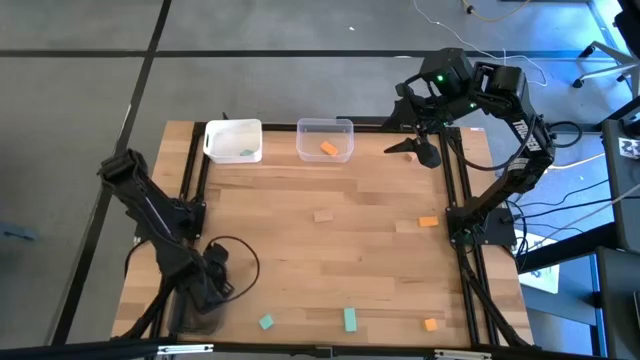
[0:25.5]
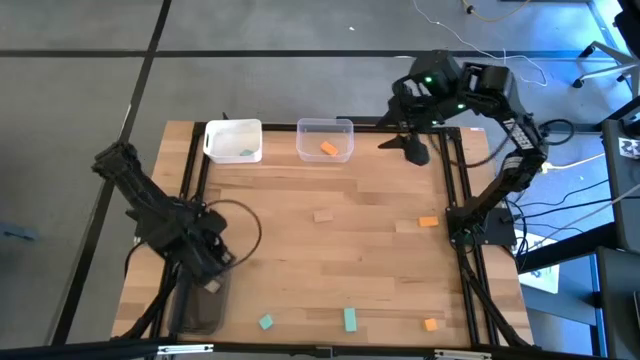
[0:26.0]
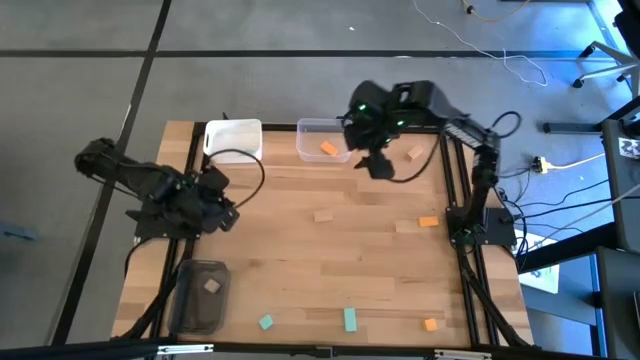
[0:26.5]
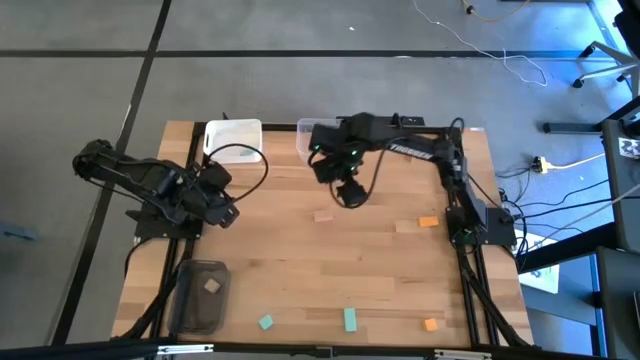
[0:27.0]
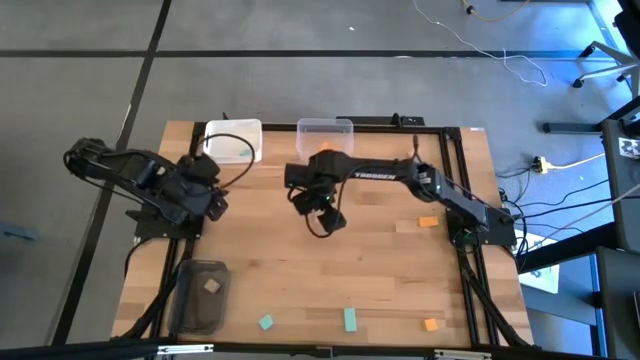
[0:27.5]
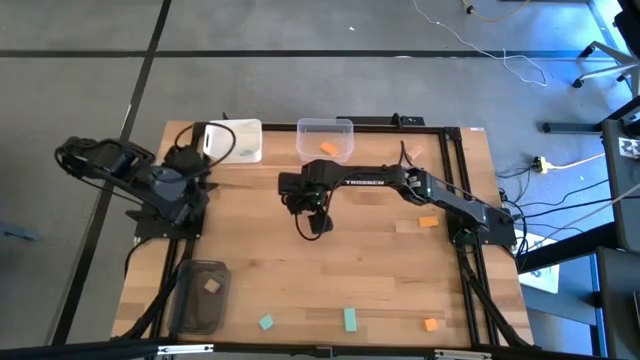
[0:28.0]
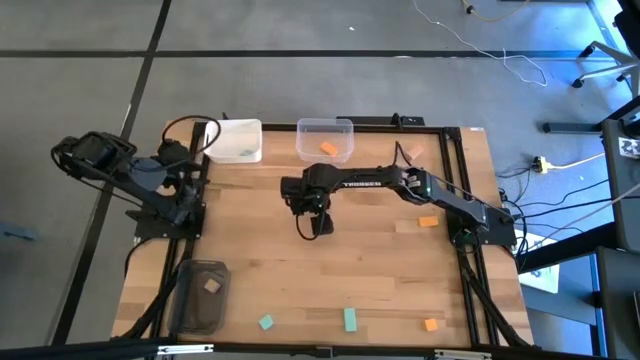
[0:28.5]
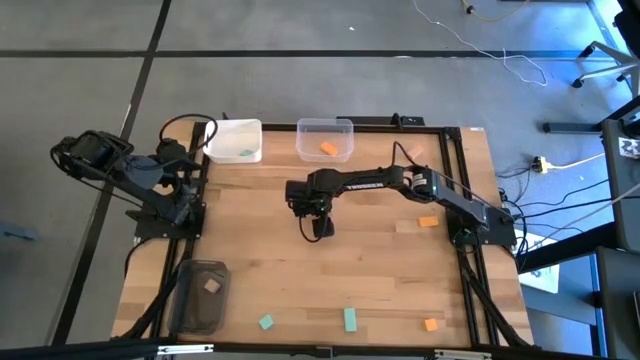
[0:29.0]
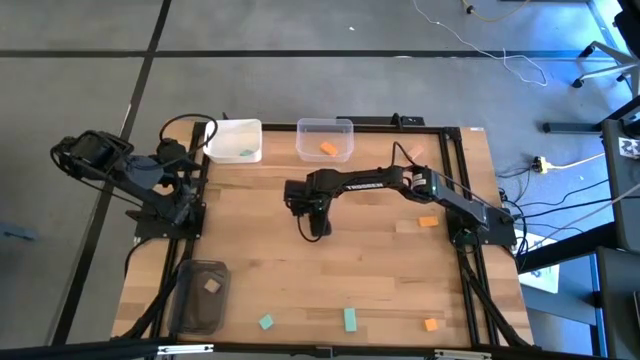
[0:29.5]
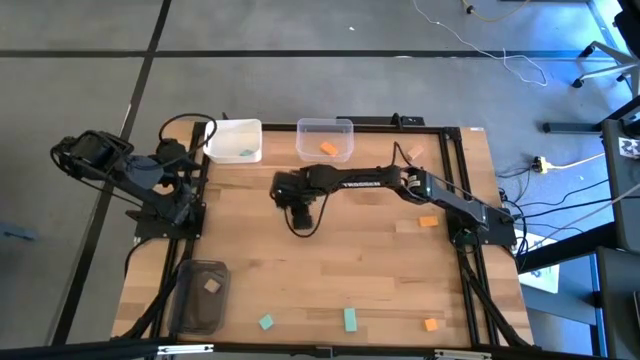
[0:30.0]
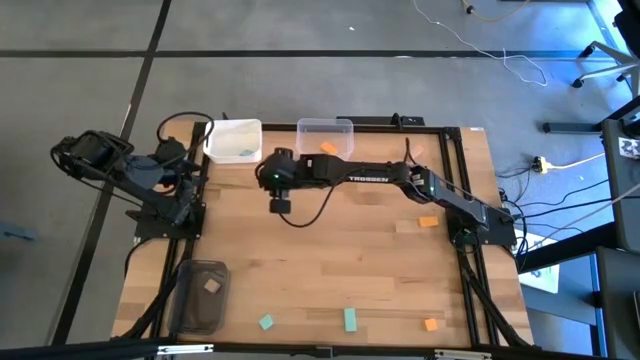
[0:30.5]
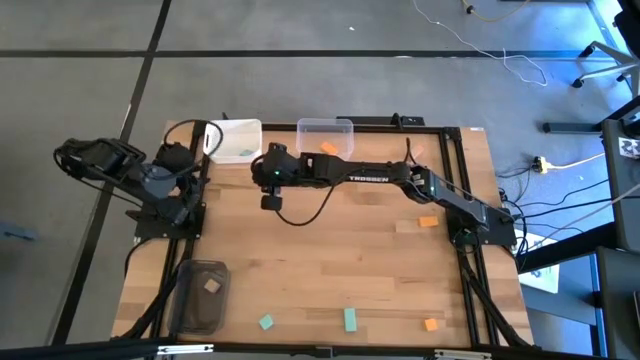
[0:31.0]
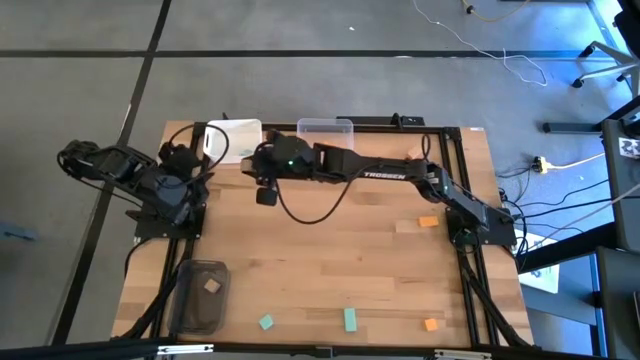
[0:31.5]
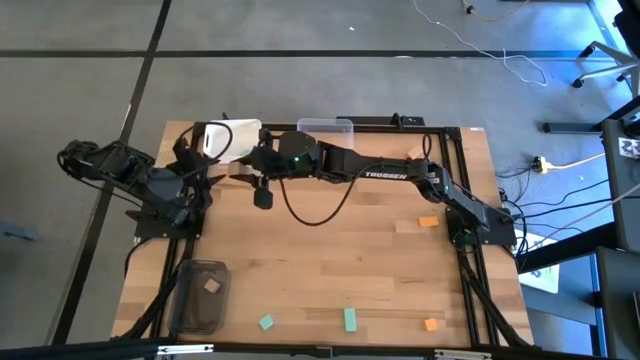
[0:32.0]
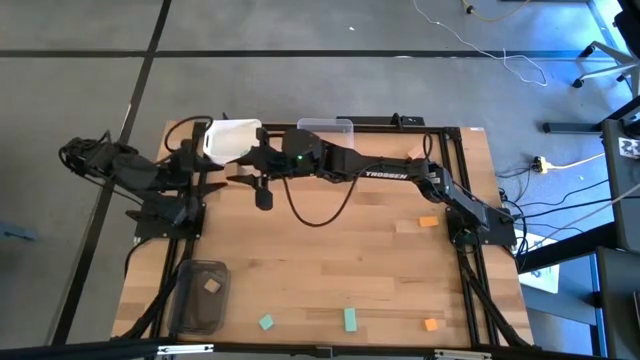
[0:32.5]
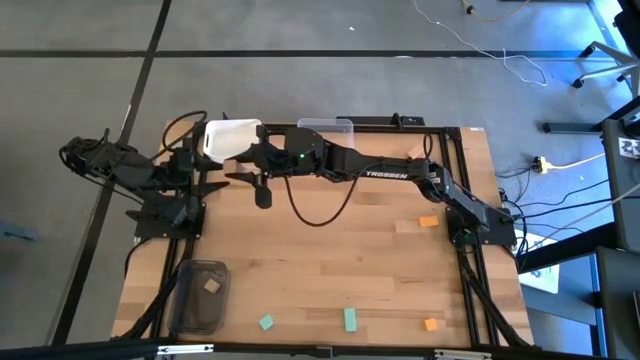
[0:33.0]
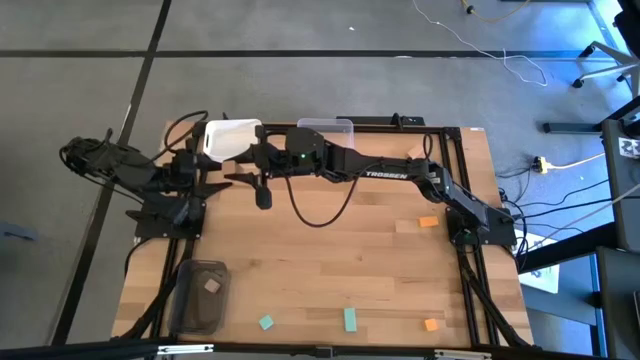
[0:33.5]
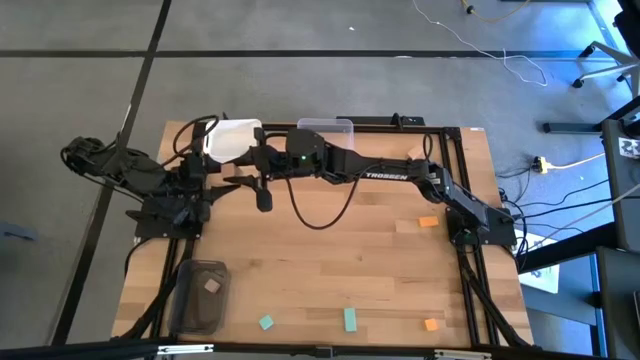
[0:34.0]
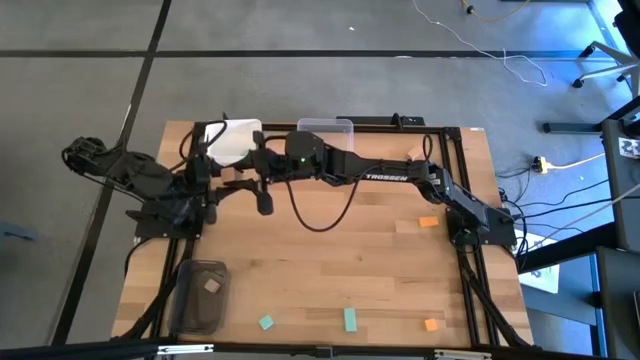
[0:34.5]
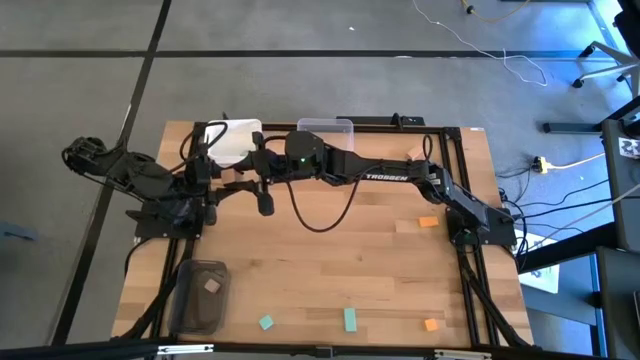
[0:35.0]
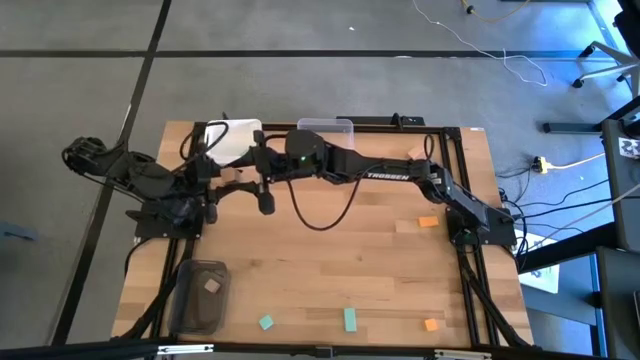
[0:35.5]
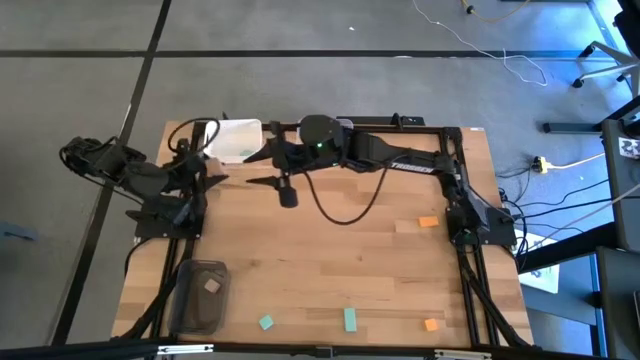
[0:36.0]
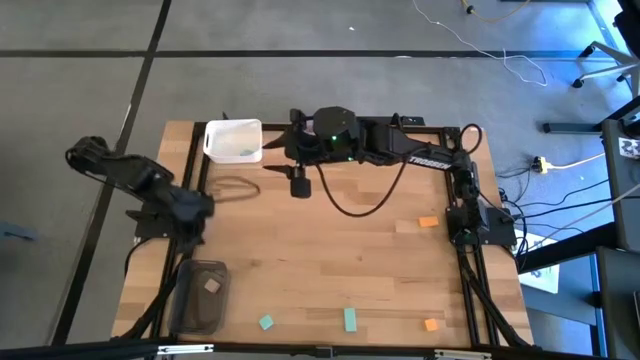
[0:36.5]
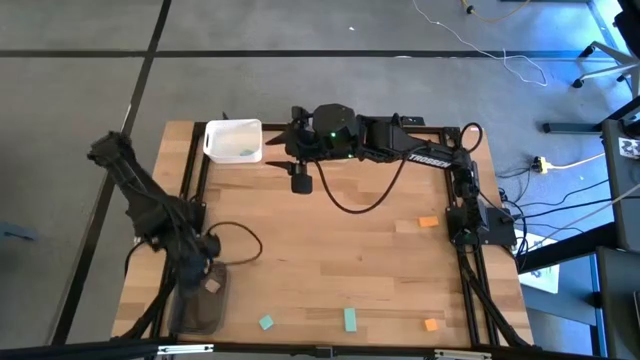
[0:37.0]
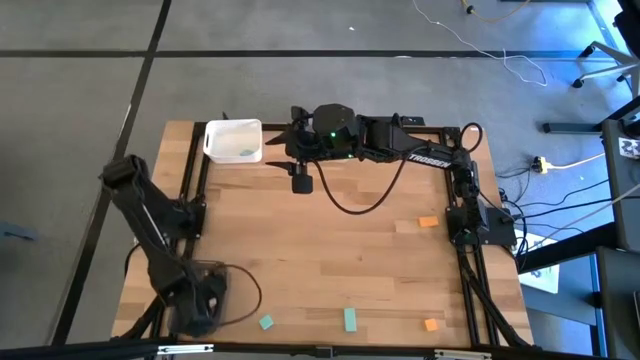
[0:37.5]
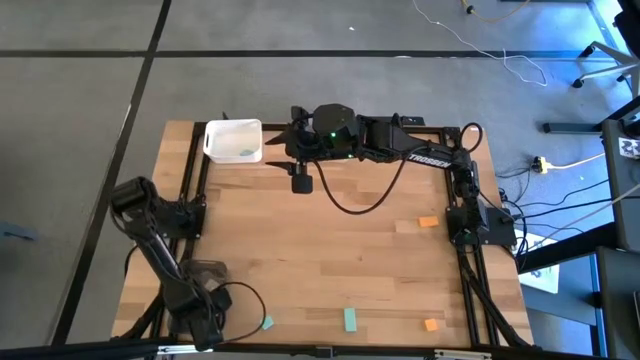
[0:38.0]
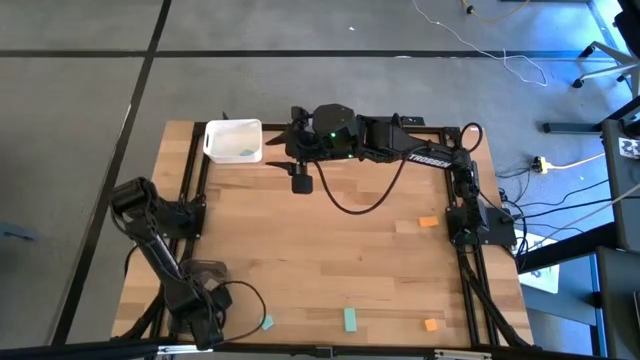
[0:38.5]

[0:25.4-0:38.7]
Task: Sort & place blocks by color
Put the bottom brown block into the black bin

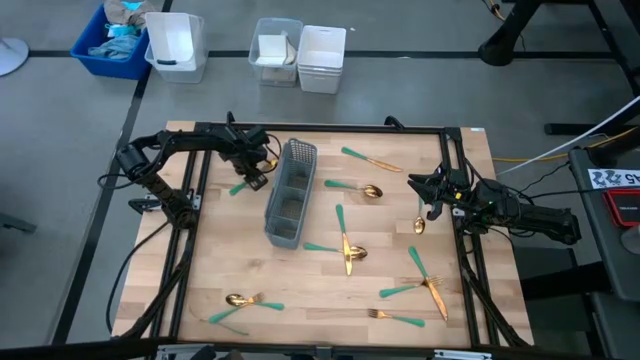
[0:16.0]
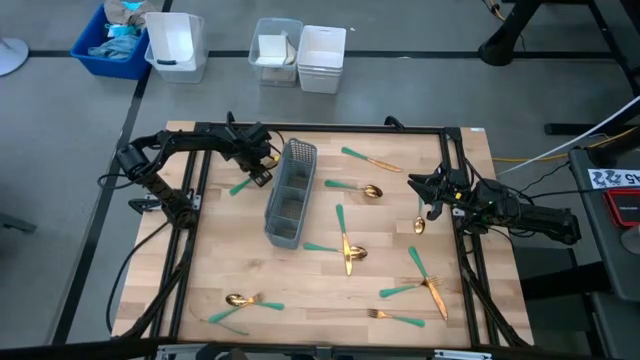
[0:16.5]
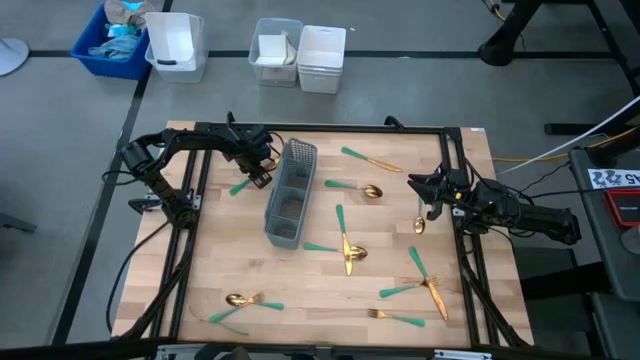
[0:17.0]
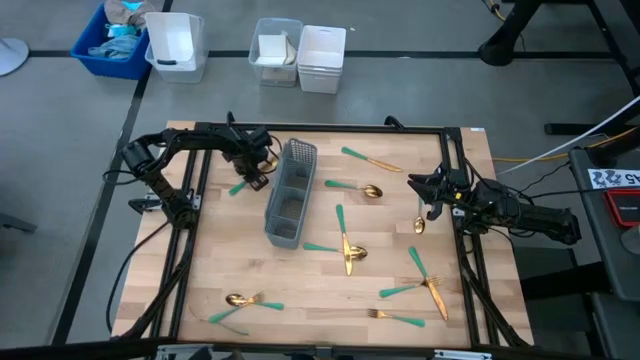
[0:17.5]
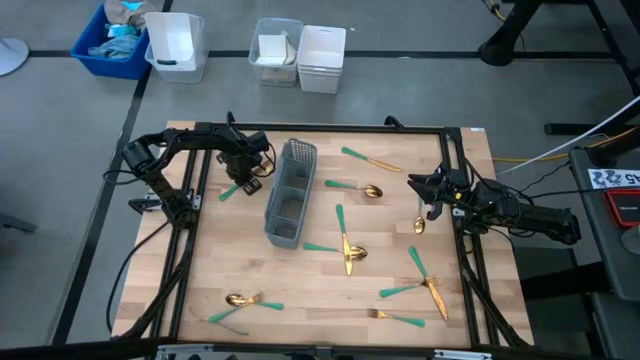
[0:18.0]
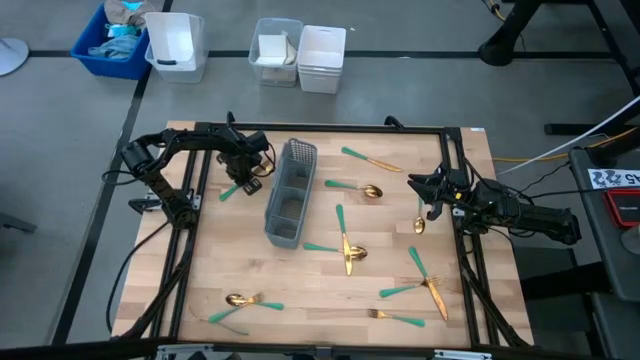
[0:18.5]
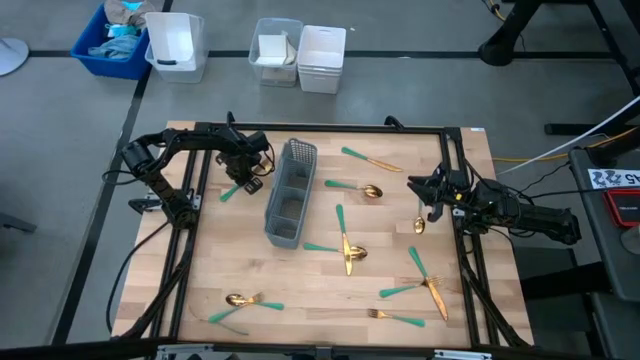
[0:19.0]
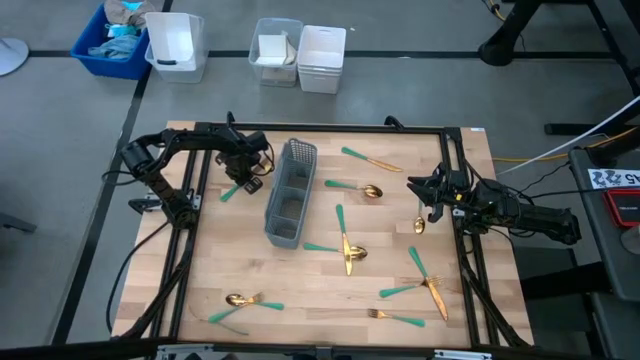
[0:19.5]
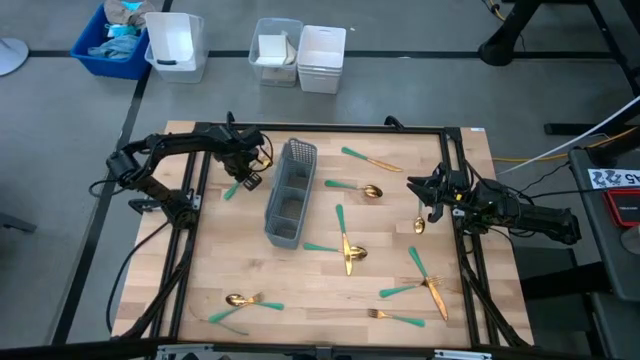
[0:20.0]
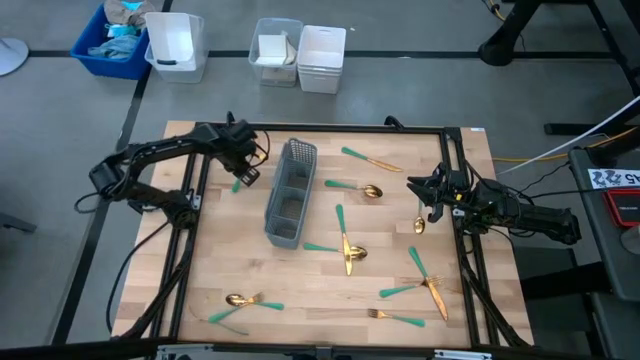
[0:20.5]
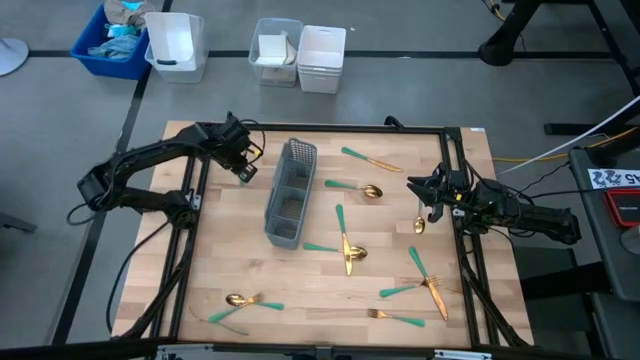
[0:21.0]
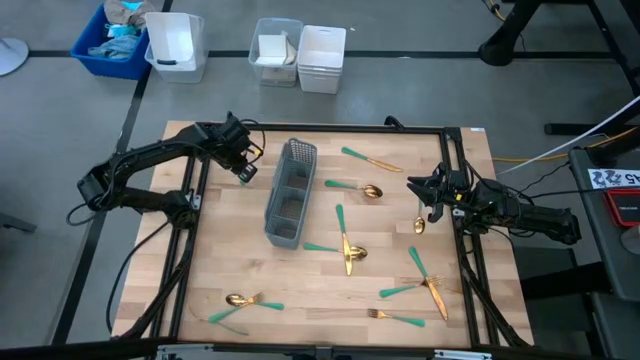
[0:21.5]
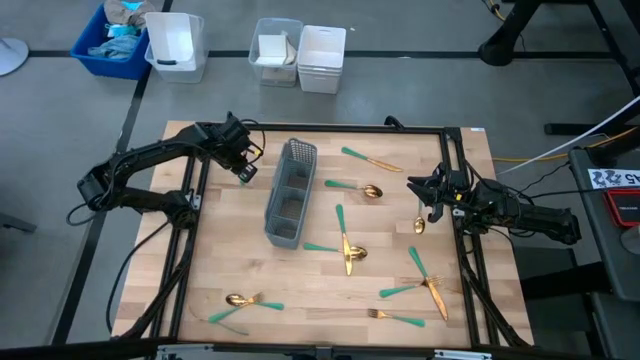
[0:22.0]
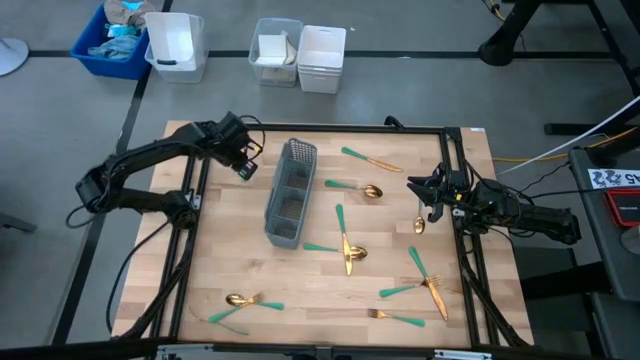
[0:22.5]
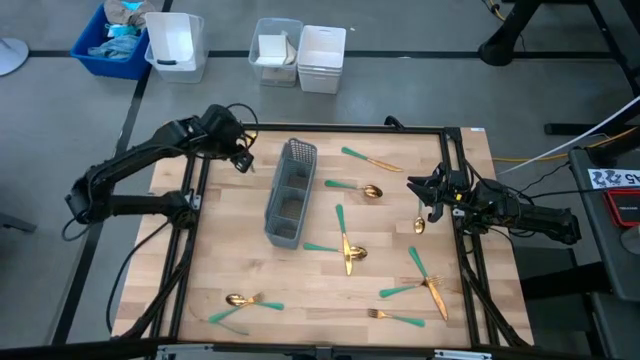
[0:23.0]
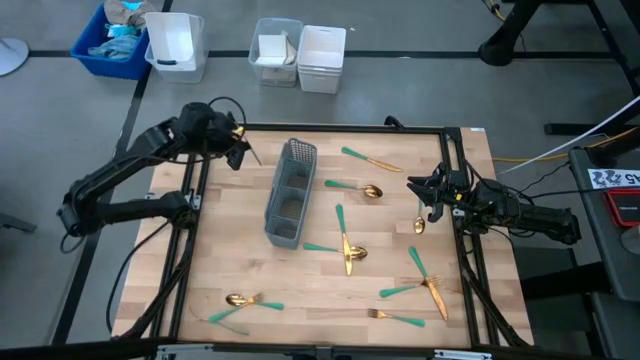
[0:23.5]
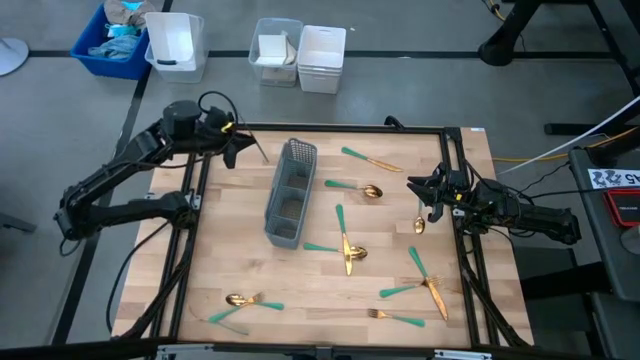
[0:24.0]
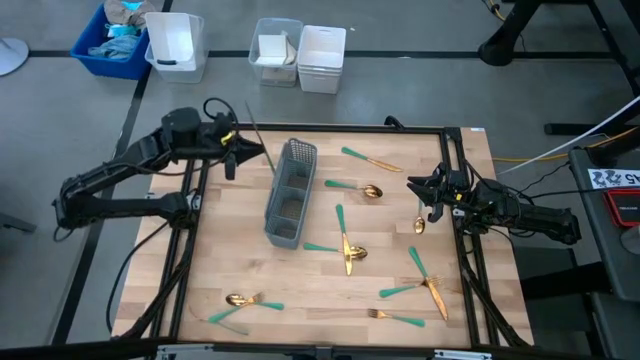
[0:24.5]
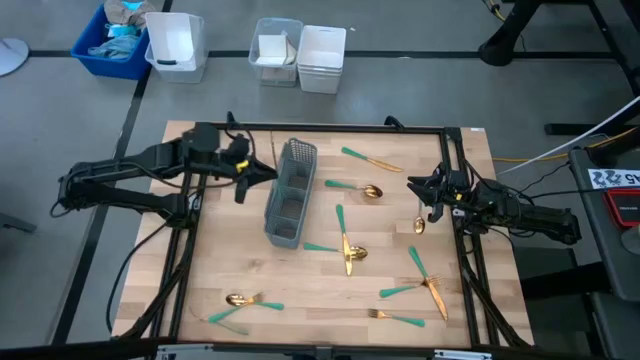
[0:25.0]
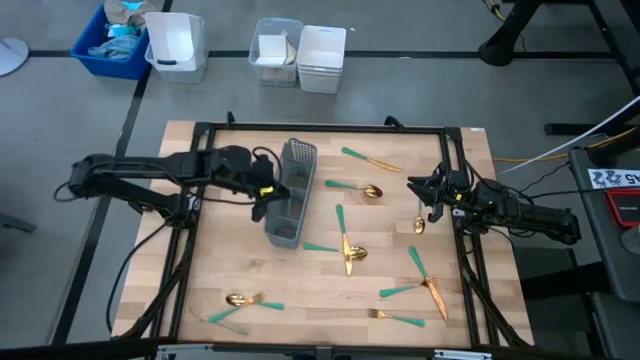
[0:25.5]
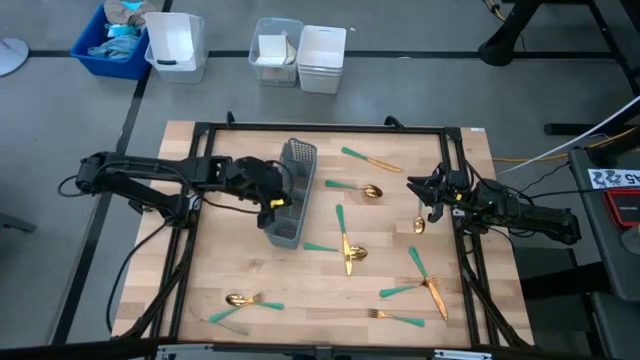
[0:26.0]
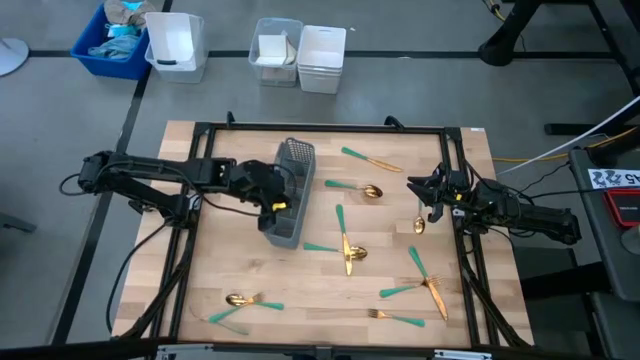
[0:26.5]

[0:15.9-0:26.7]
Task: Sort silverware
Put the green table knife into the gray silverware rack
